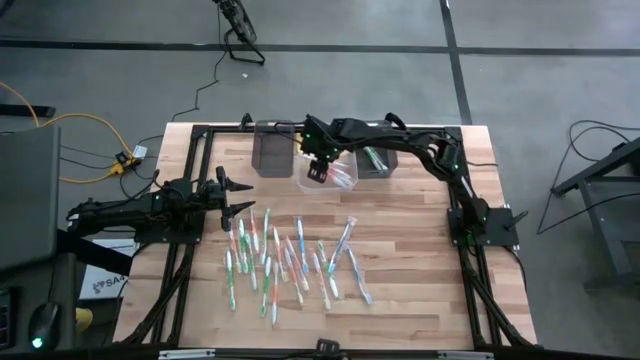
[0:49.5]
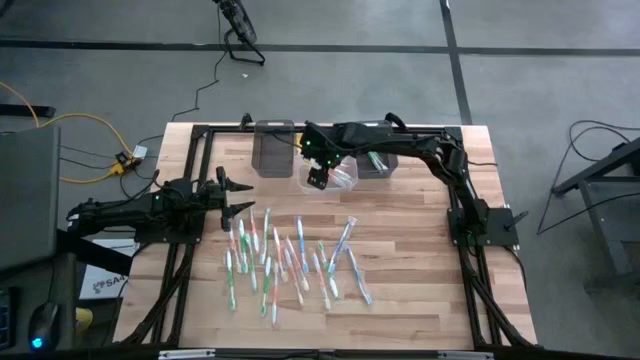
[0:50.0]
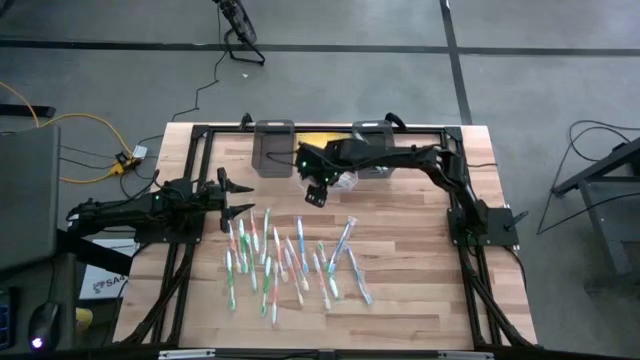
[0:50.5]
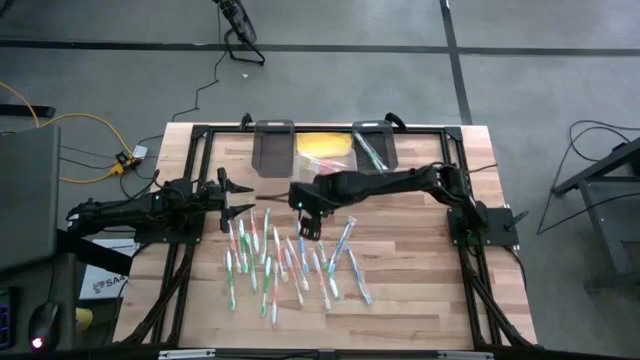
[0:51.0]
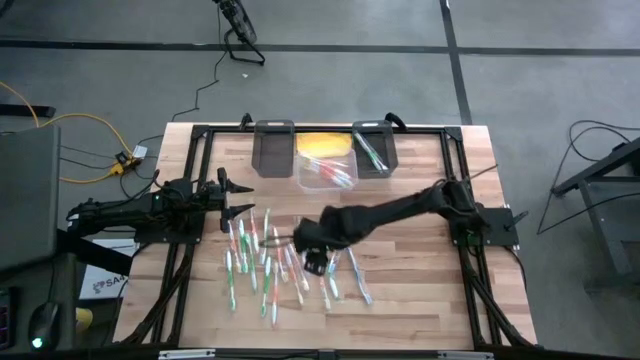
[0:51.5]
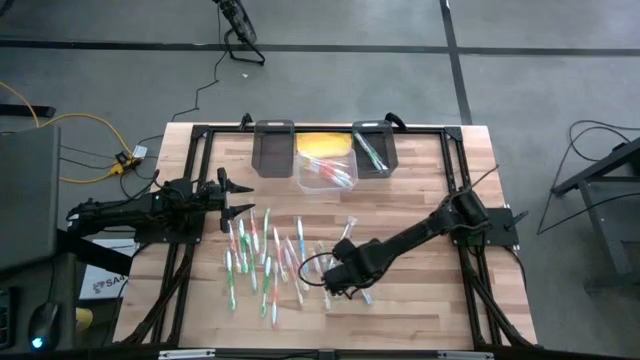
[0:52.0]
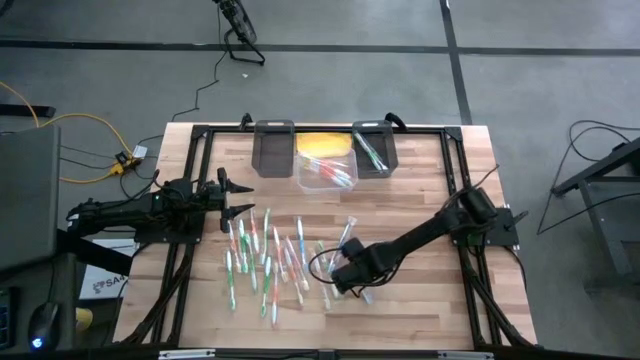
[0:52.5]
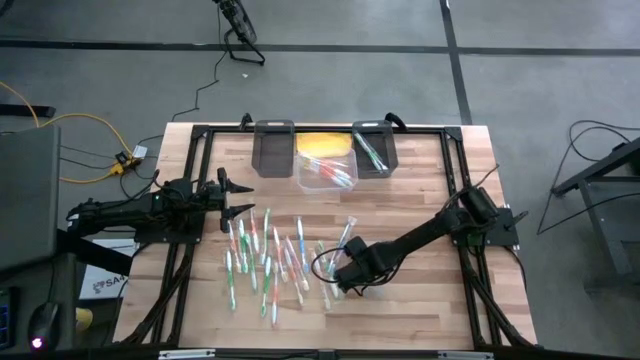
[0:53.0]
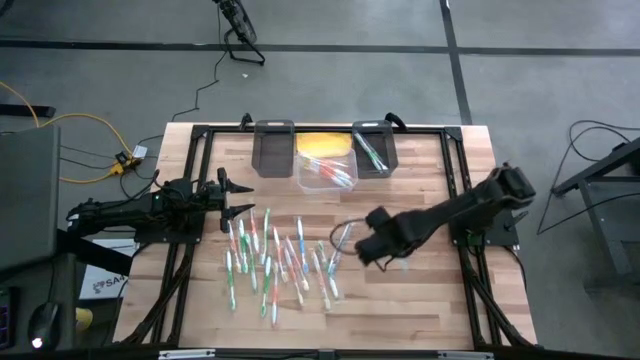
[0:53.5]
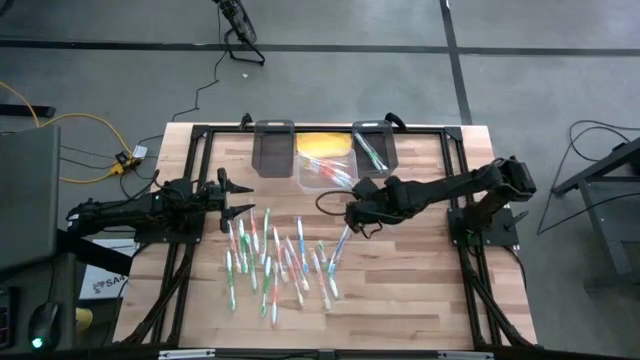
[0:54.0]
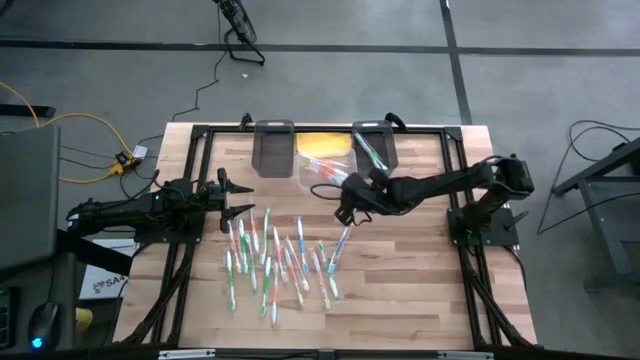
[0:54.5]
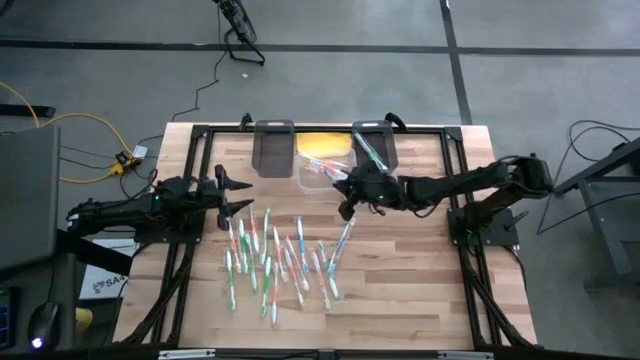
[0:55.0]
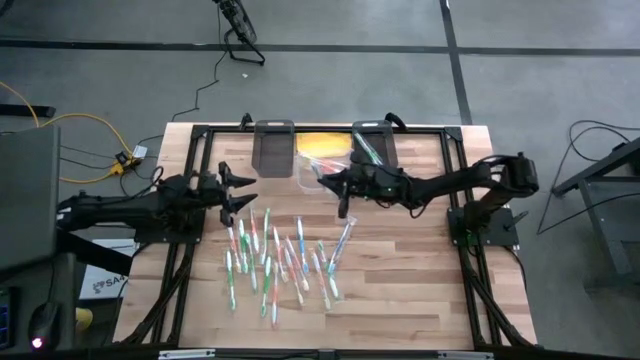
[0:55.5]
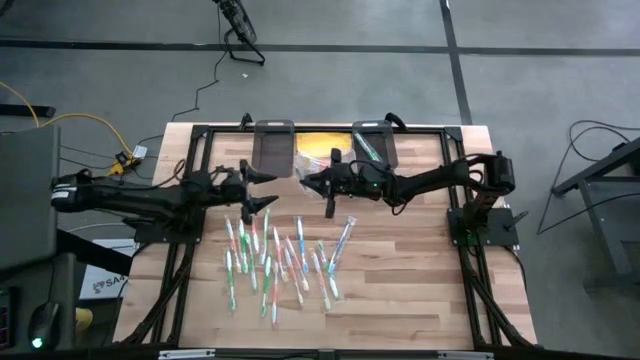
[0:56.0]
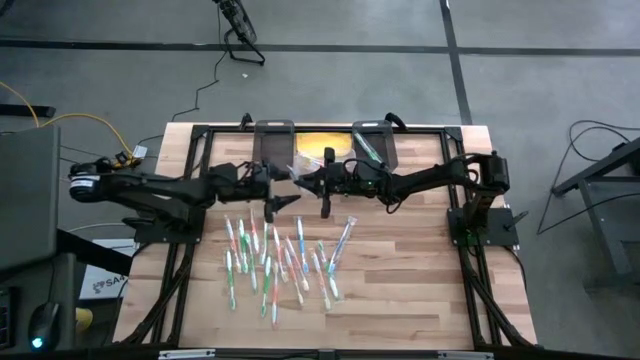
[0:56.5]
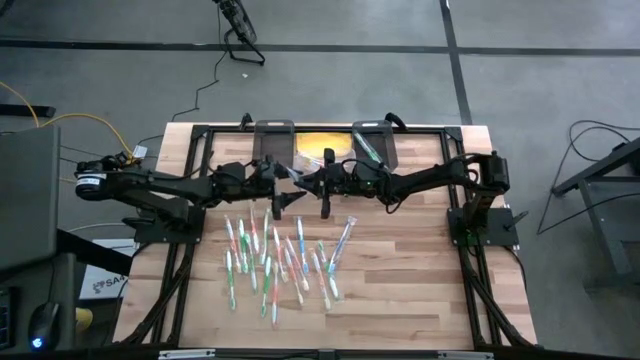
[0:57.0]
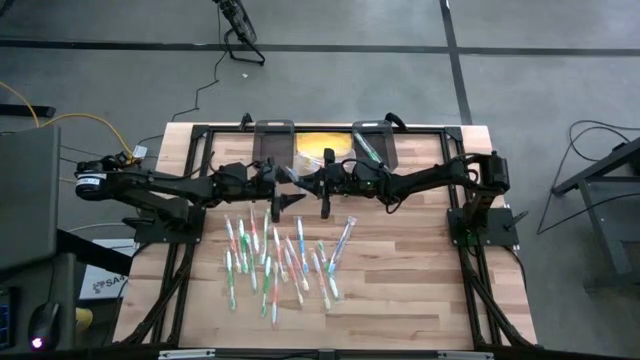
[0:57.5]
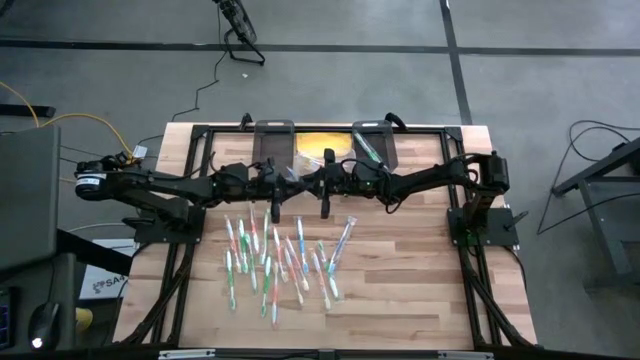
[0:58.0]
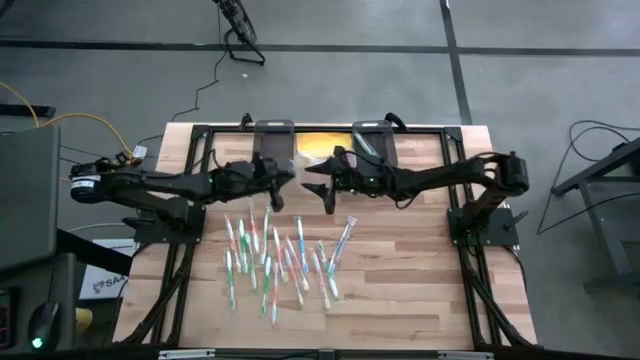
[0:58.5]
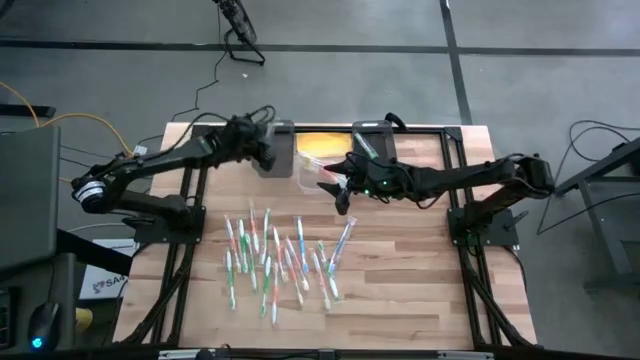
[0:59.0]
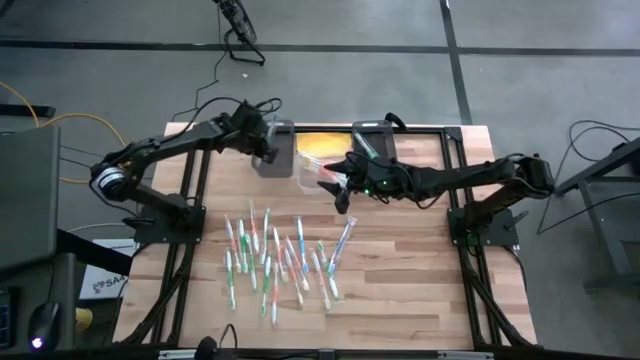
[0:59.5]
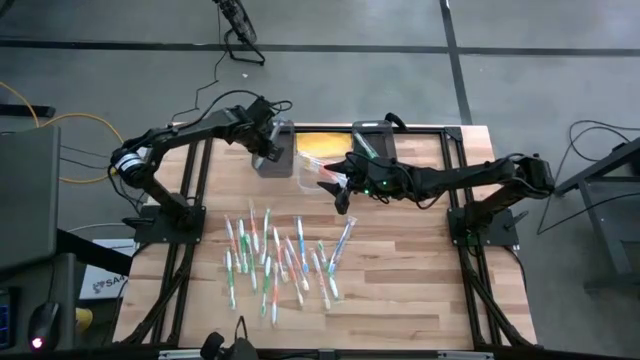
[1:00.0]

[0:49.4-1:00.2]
Task: Pick & Place Toothbrushes
Put the blue toothbrush into the left black bin

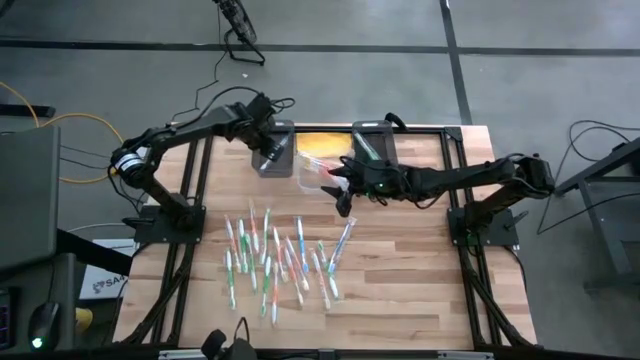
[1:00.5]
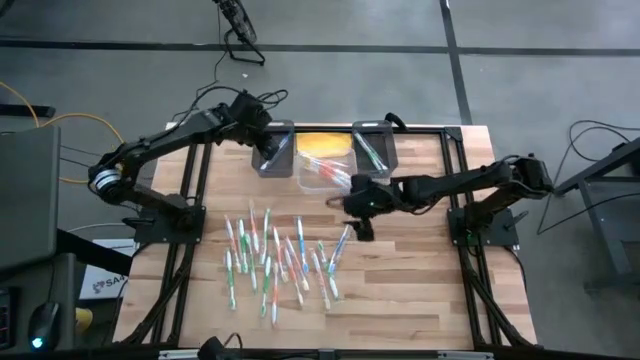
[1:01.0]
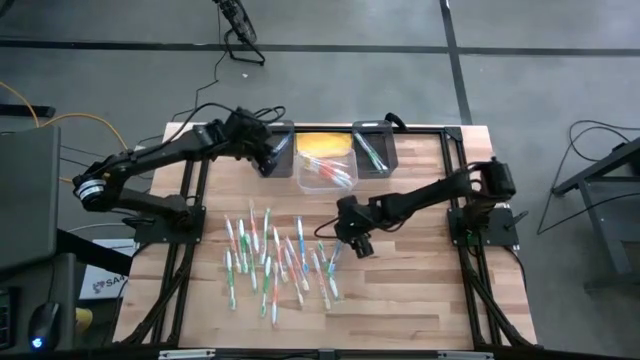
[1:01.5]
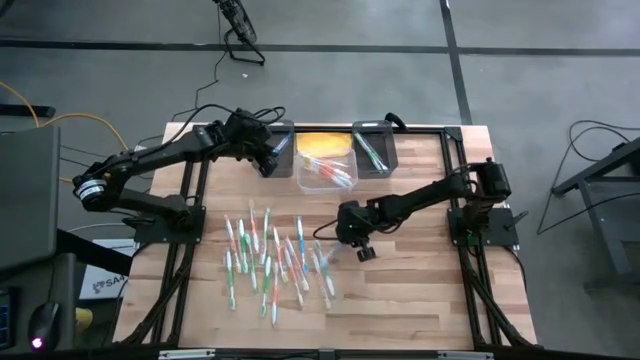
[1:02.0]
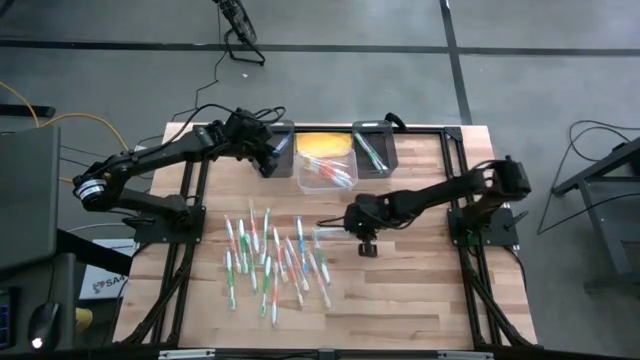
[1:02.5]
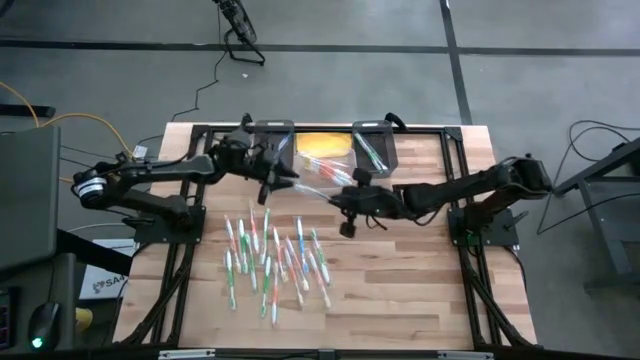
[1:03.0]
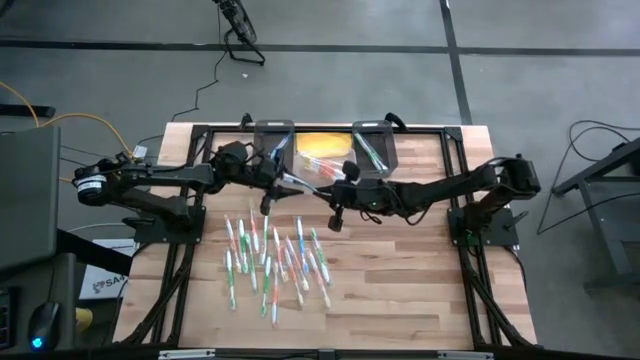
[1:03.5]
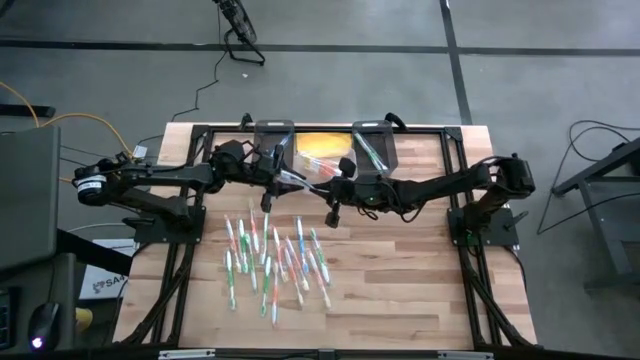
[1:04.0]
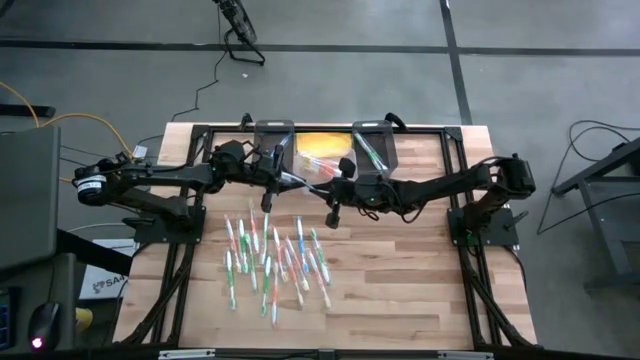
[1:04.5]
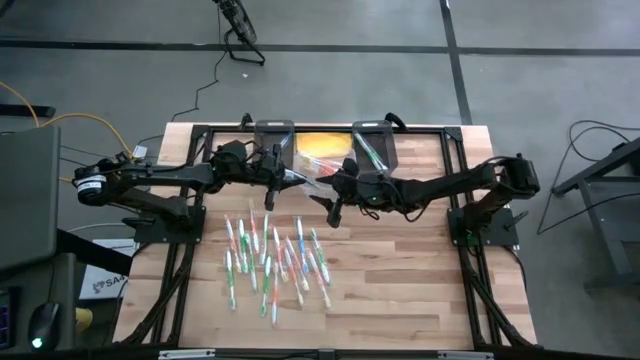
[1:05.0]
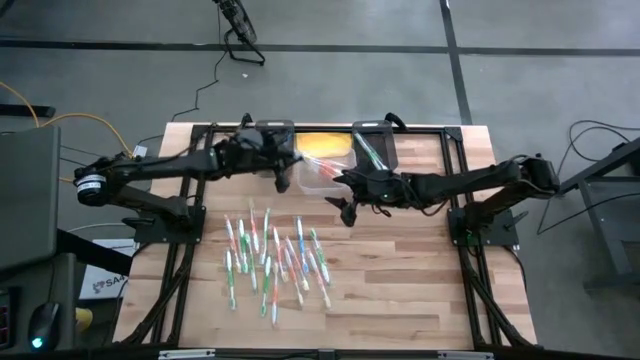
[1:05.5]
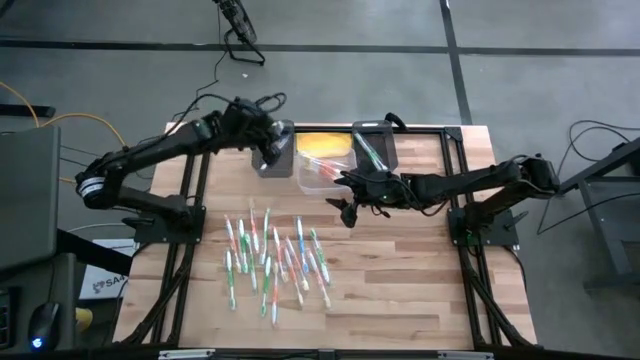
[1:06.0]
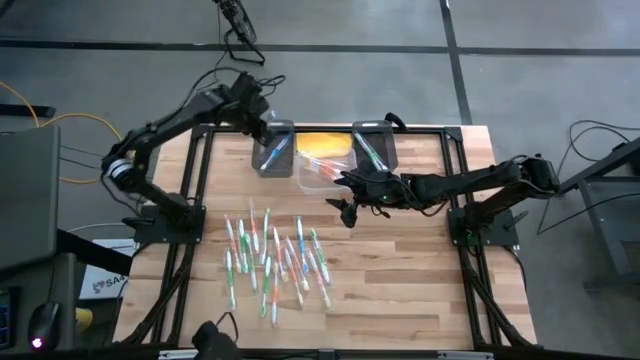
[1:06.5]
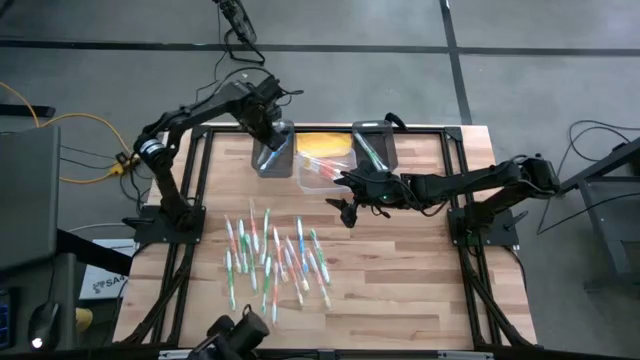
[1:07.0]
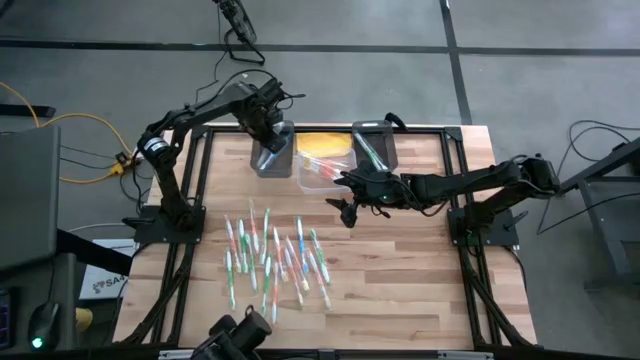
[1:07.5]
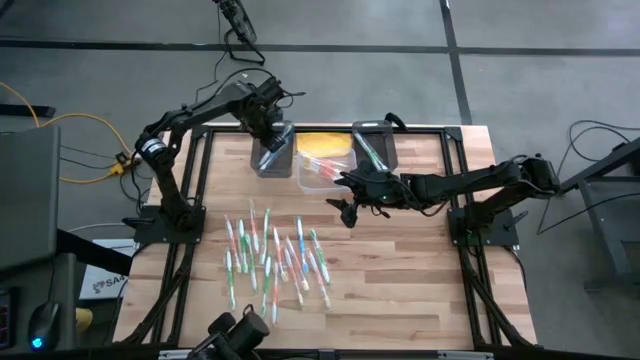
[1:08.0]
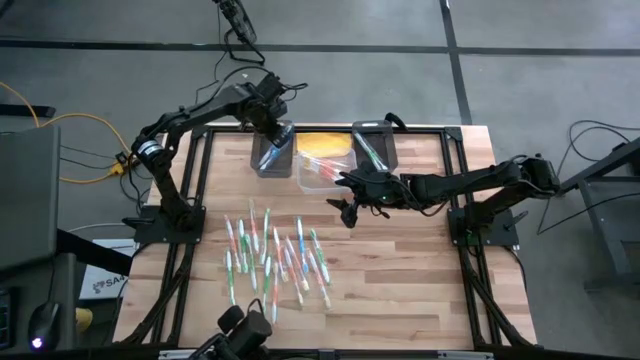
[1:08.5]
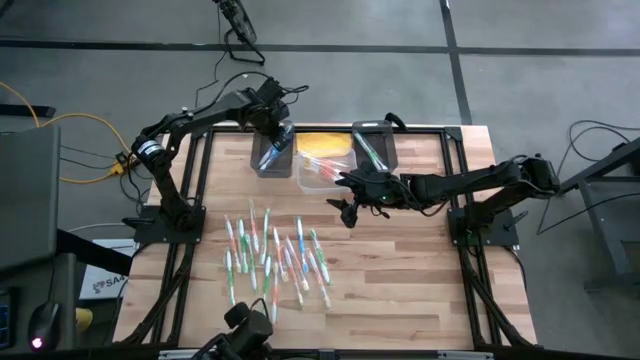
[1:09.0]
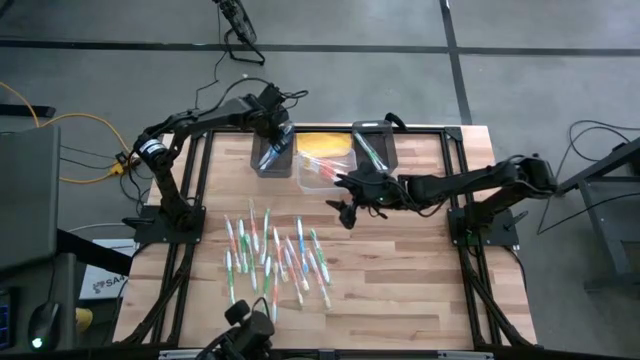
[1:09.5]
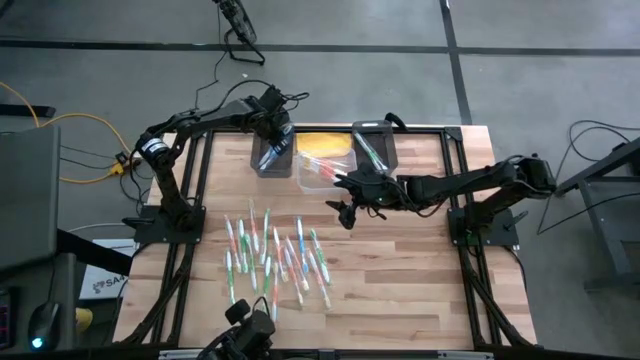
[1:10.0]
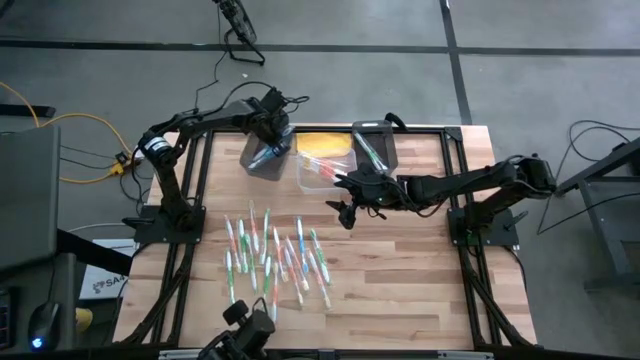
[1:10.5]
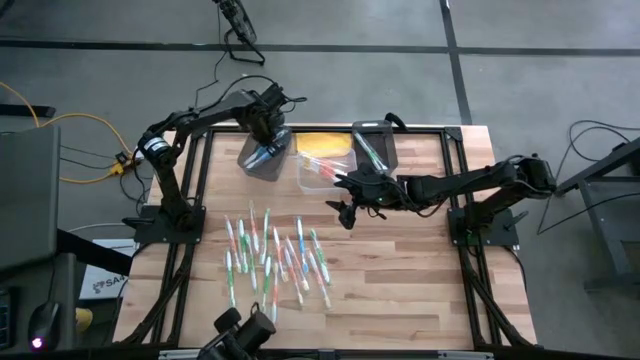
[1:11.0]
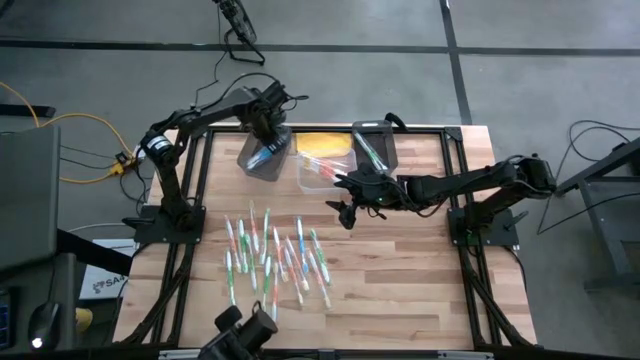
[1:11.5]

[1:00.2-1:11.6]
Put the blue toothbrush into the left black bin
